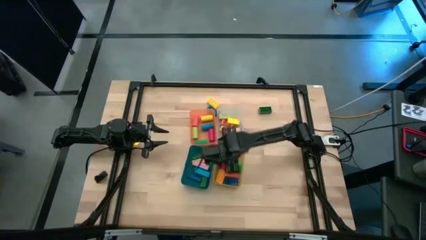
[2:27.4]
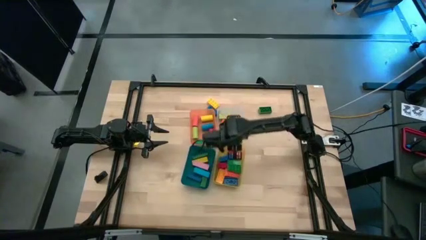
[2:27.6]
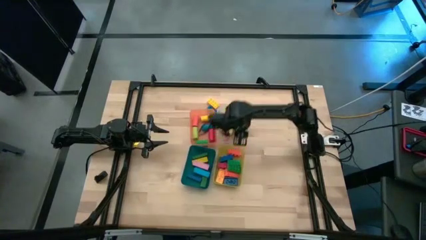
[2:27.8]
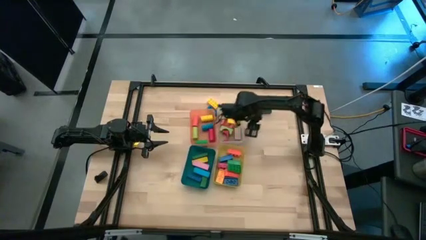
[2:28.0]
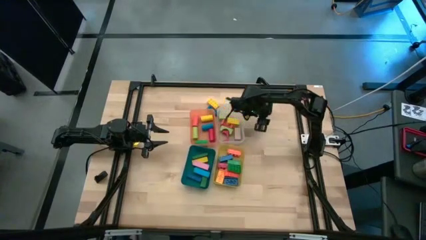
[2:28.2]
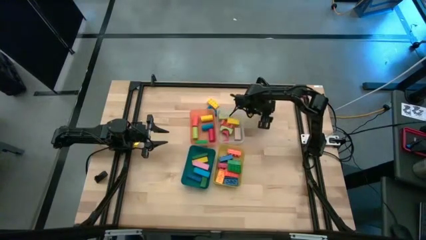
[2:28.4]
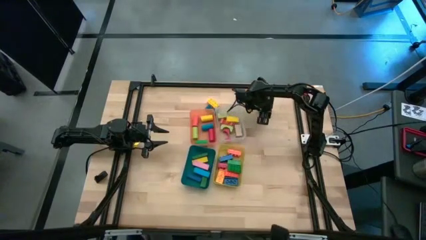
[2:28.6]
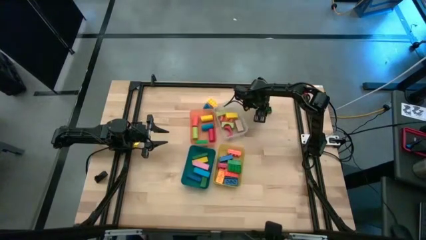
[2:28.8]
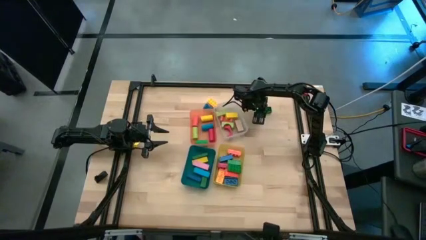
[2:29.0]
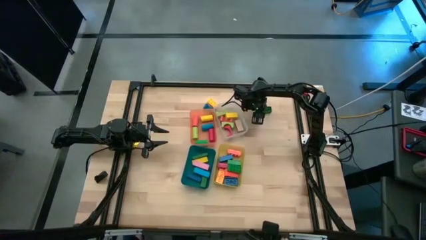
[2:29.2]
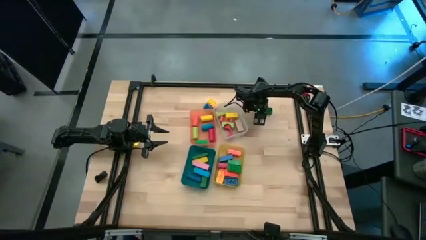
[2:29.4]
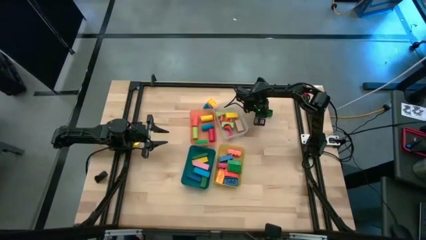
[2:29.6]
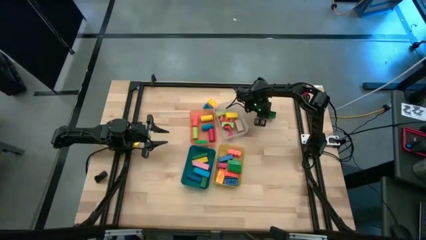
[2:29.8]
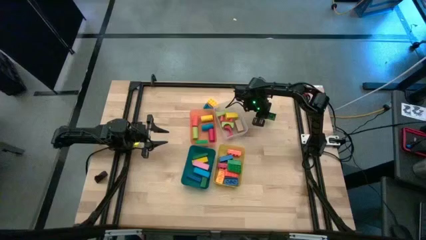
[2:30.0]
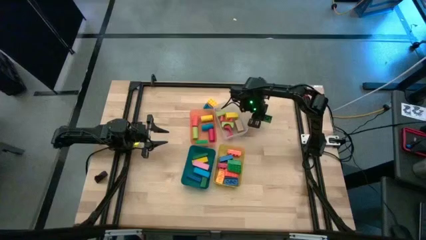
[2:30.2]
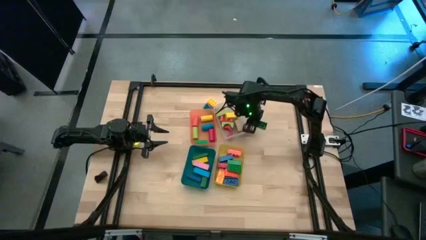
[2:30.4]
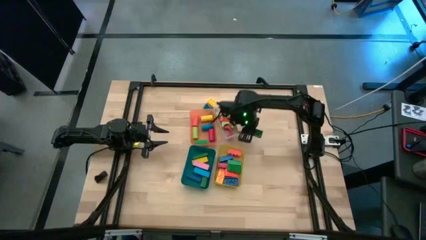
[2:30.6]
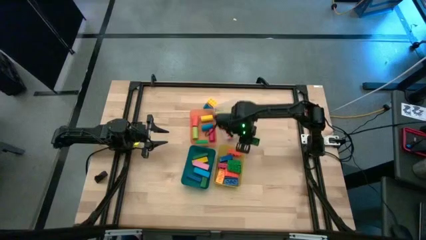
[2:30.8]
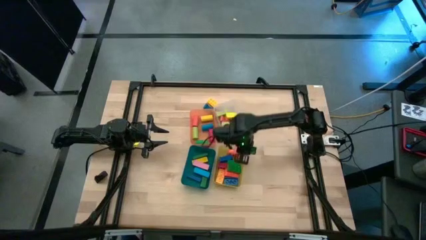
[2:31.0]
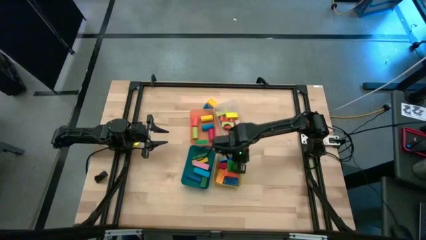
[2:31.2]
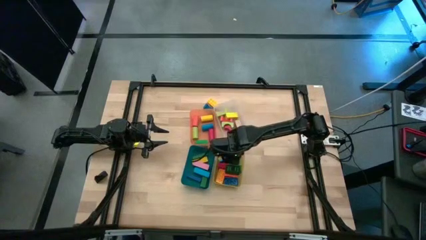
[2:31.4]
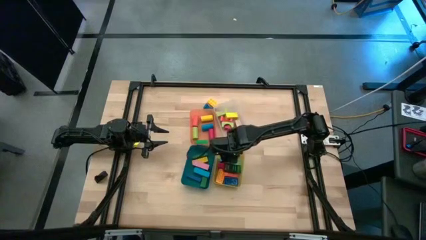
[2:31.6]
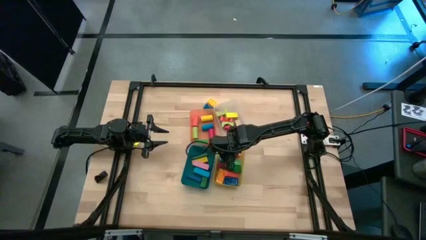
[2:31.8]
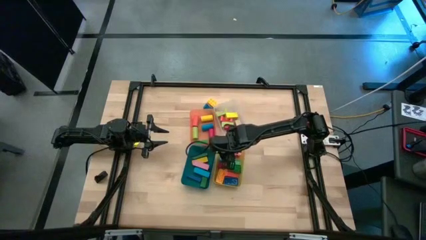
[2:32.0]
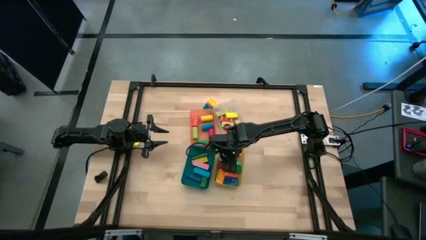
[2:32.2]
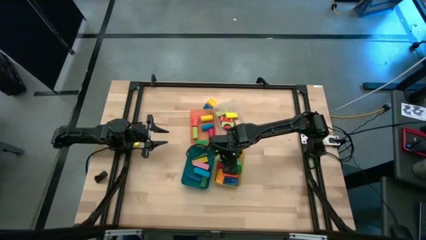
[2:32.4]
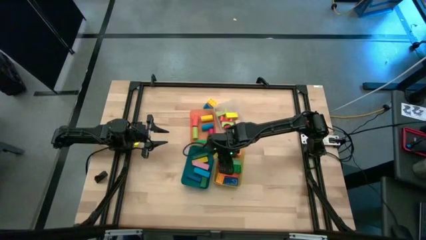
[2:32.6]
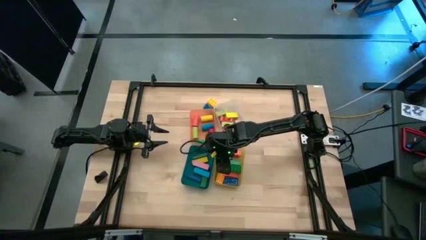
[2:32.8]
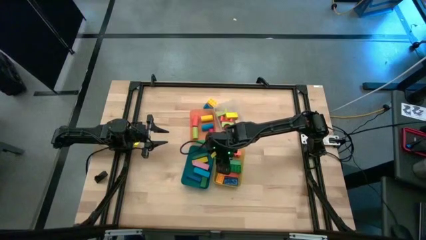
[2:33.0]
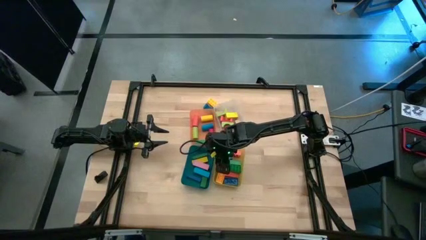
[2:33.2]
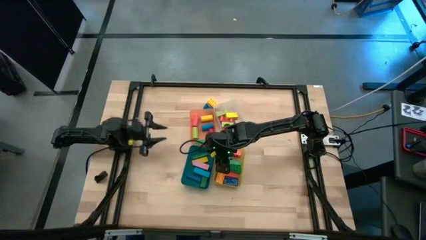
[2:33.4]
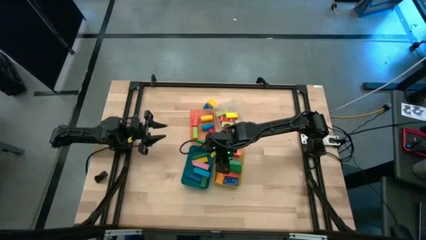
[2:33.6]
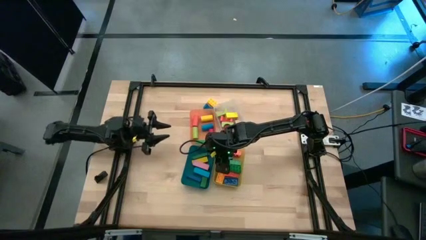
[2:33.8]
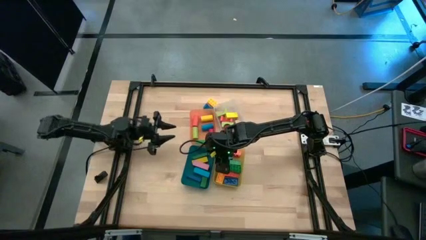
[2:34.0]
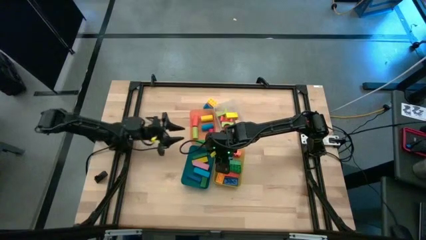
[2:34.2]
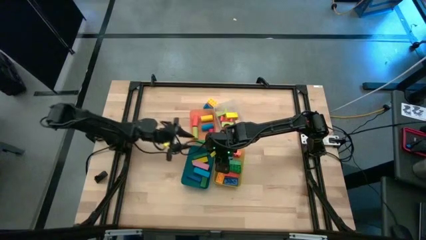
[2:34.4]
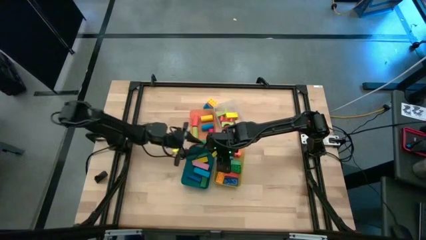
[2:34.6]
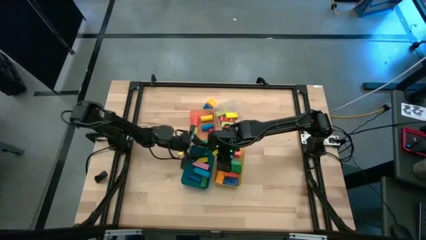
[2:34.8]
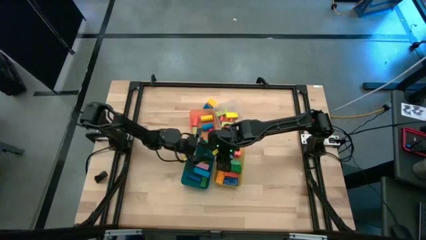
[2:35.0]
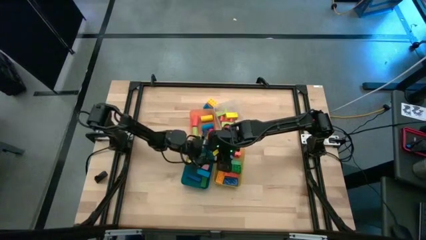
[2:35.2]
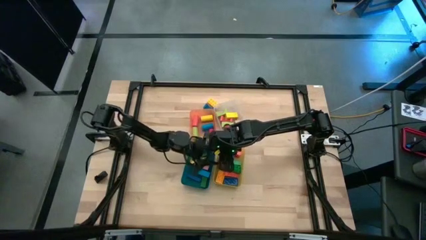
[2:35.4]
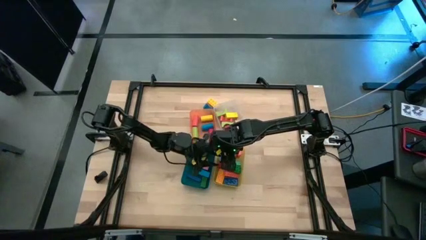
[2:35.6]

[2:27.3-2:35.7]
Task: Sort blocks by size
Put the green game piece into the yellow bin

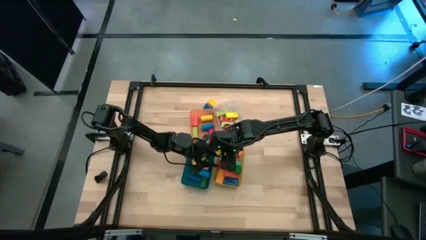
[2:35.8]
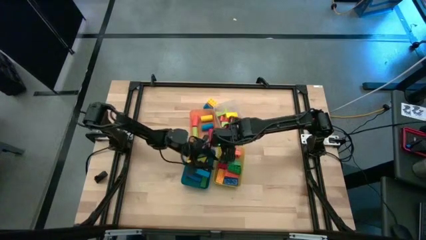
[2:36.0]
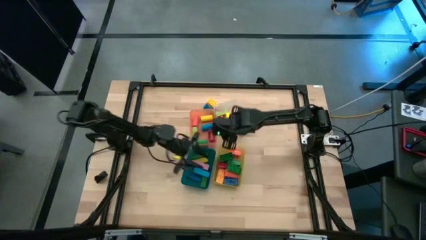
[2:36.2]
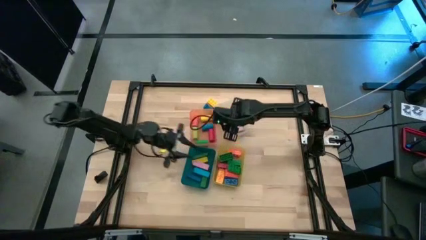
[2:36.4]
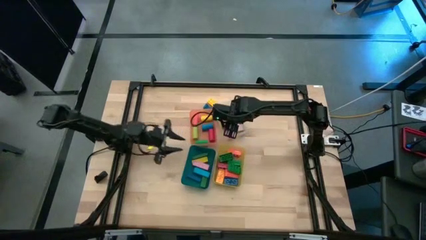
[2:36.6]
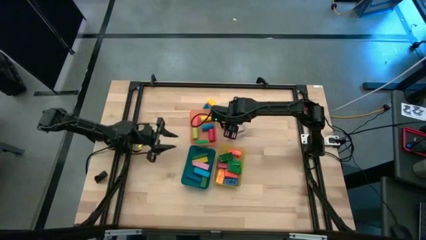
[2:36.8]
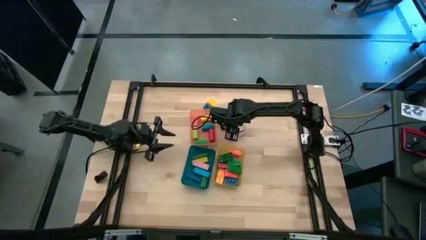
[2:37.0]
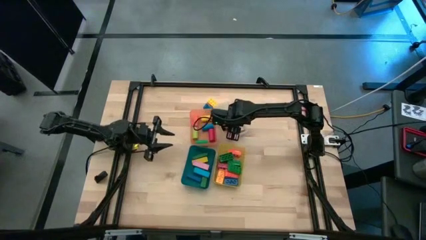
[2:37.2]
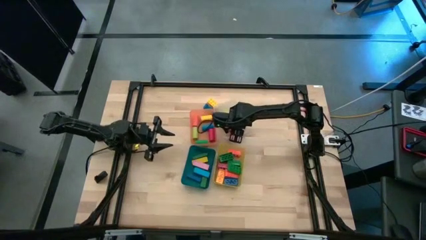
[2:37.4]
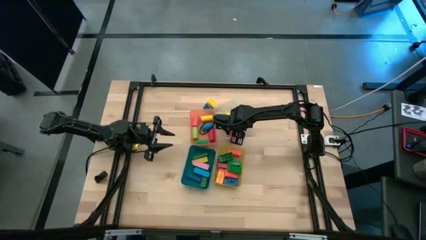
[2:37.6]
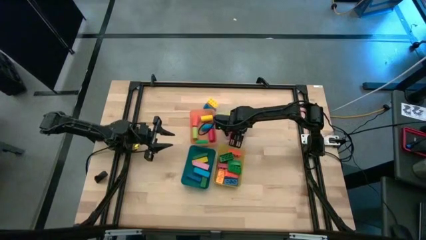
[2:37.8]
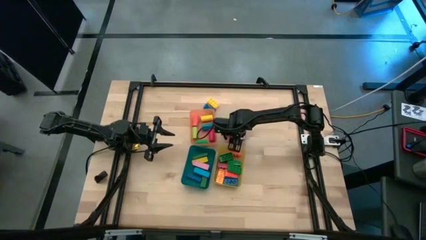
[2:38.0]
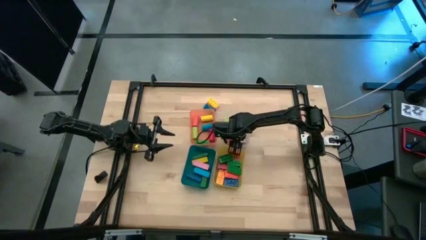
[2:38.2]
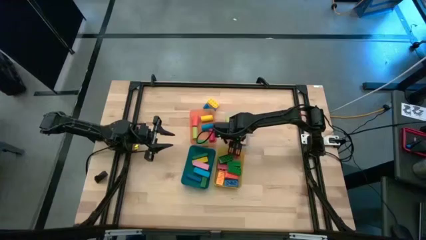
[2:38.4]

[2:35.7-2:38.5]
Adjust the transparent bin

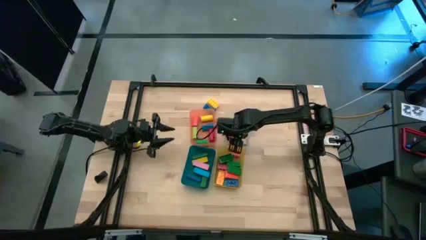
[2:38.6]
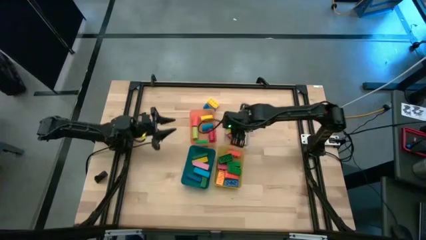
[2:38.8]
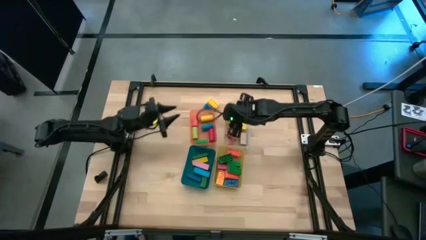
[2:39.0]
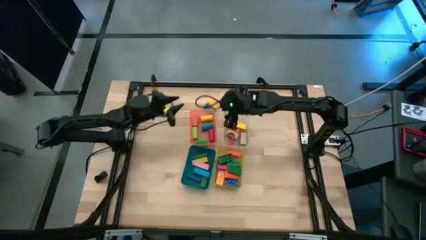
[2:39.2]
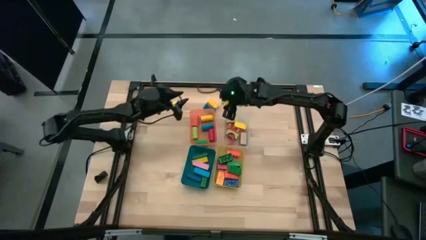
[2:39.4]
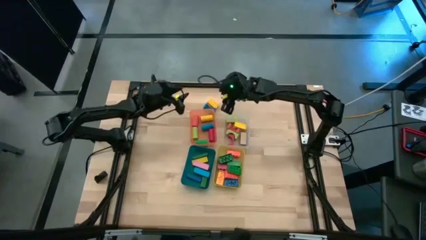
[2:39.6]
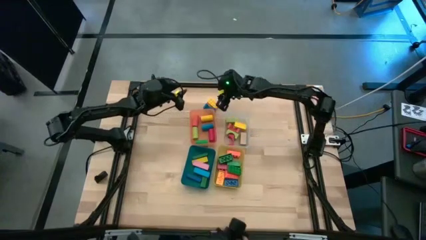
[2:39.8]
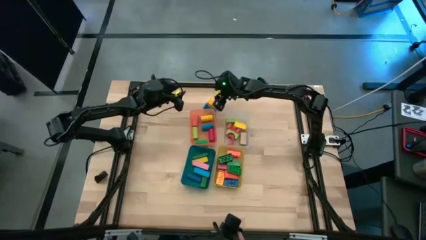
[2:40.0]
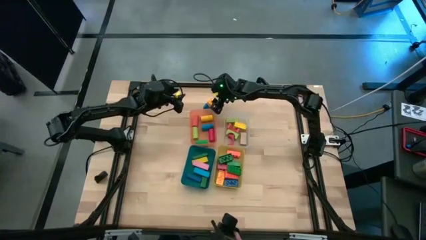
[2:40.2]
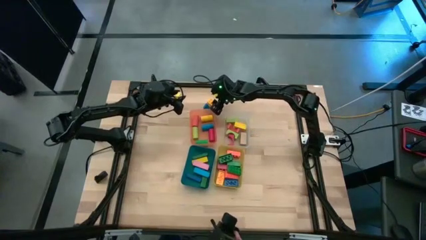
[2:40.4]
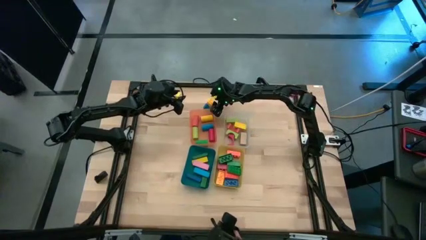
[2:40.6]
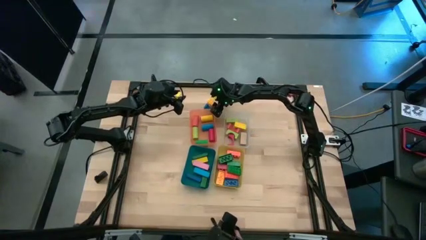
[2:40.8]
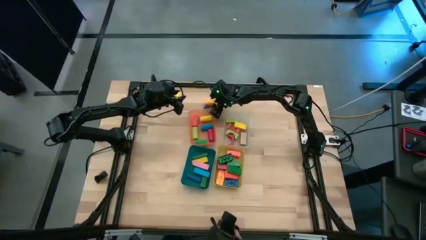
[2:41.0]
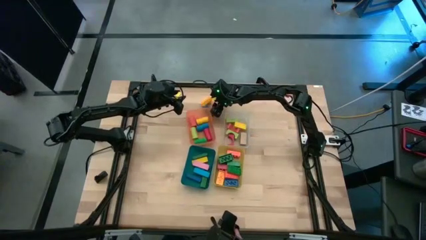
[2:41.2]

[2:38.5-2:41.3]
Put the yellow game piece into the yellow bin

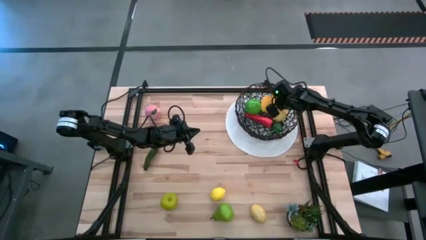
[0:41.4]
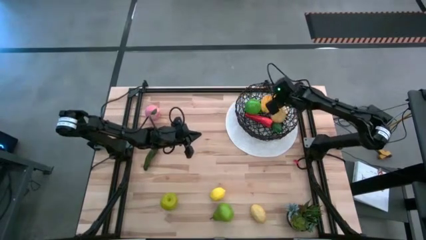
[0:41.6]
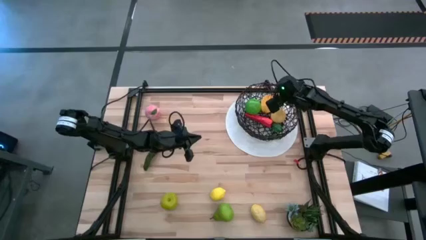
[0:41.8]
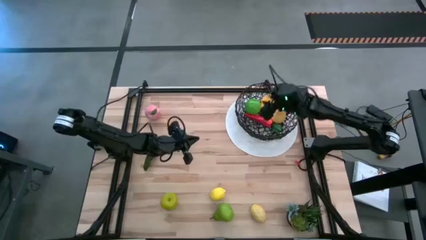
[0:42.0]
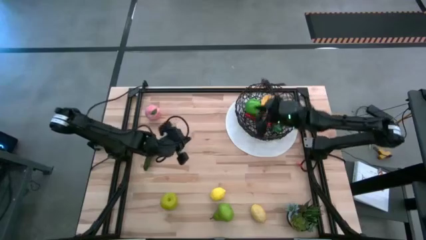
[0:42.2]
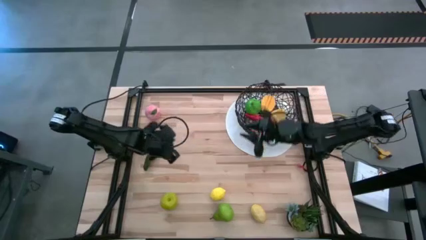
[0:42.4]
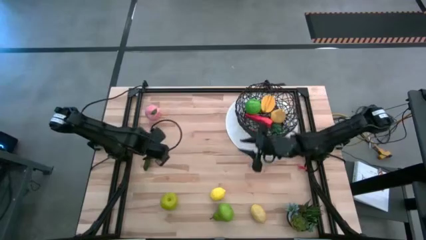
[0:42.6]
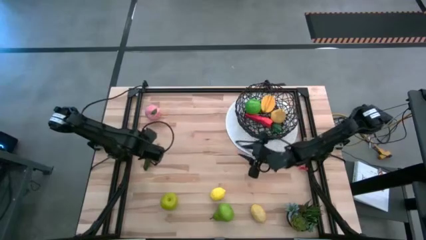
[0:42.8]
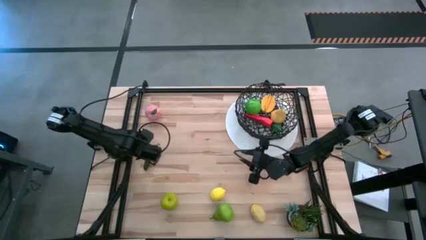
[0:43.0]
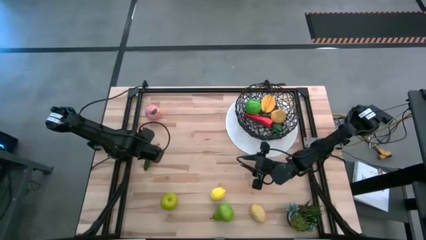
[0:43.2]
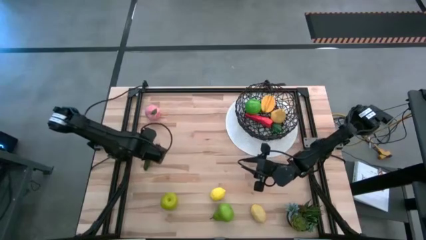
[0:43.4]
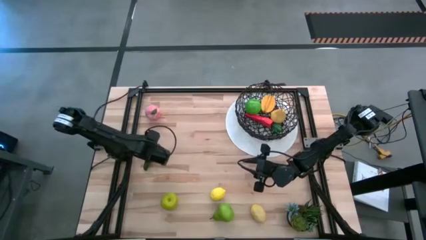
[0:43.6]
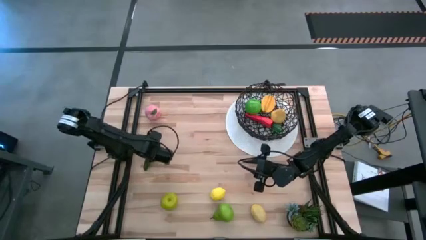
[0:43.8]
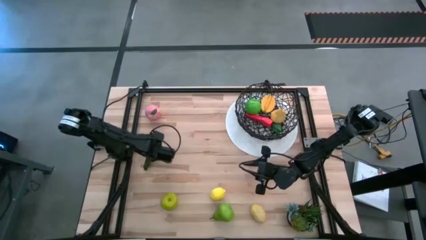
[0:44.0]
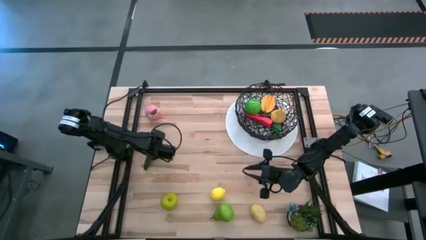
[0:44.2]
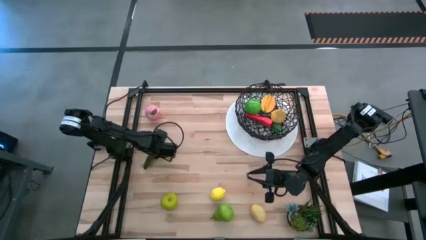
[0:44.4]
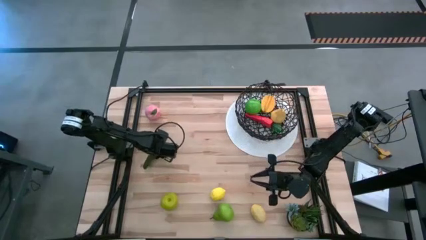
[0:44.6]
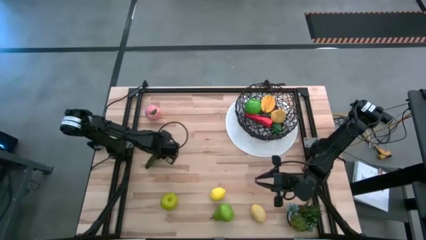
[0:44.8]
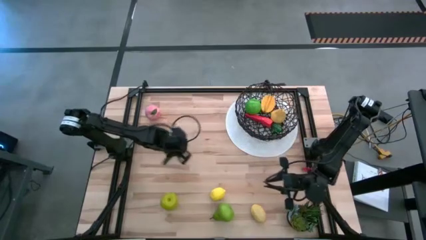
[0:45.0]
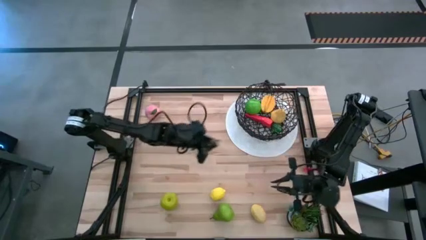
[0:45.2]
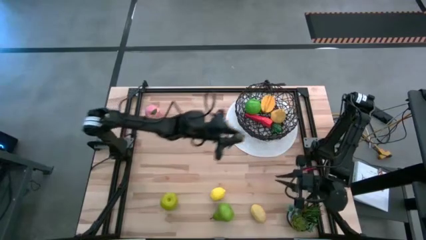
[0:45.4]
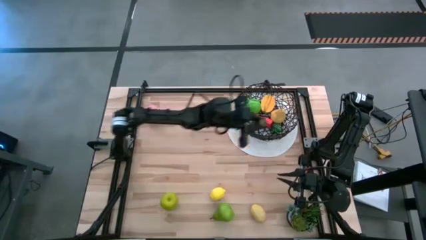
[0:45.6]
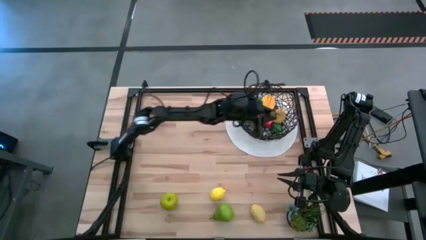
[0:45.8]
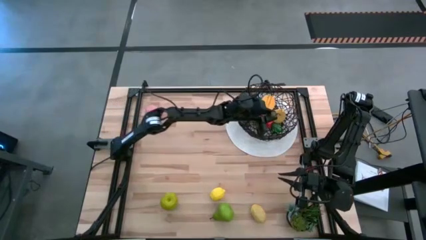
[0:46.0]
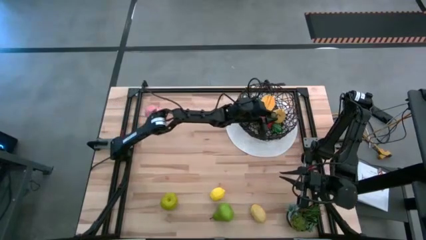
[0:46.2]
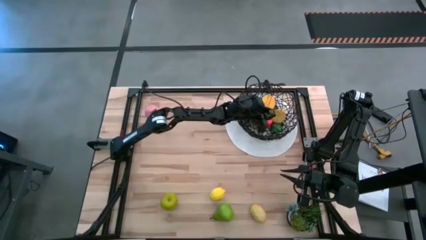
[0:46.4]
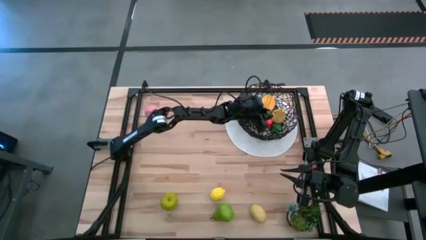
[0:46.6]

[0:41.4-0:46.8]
Task: Build produce basket
Put the green chili pepper into the black wire basket
